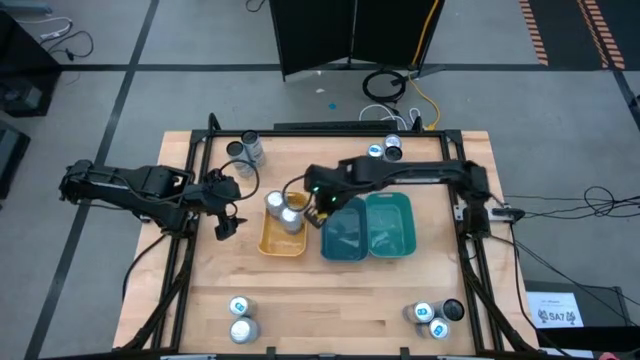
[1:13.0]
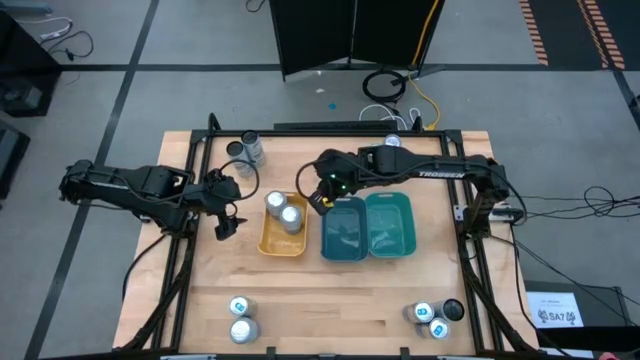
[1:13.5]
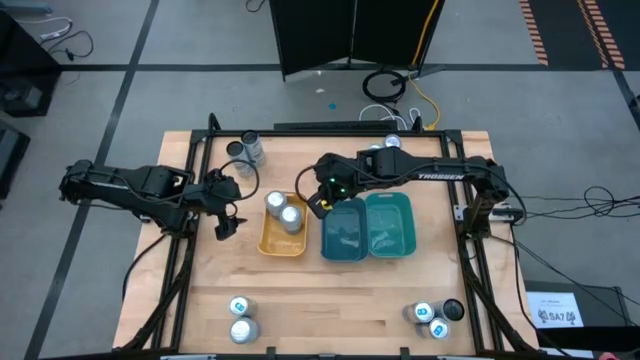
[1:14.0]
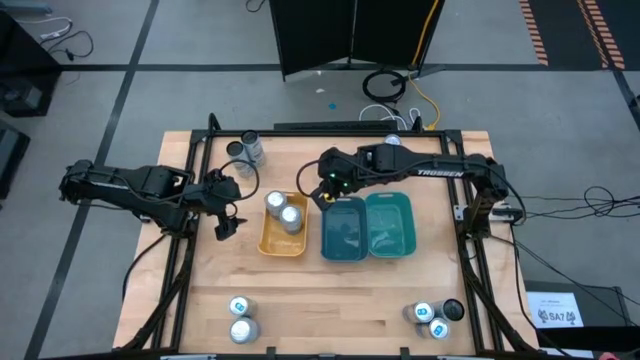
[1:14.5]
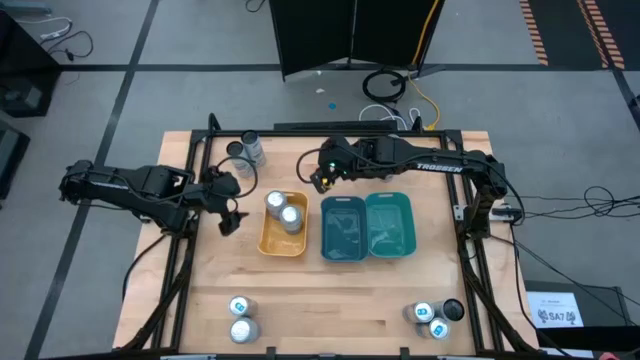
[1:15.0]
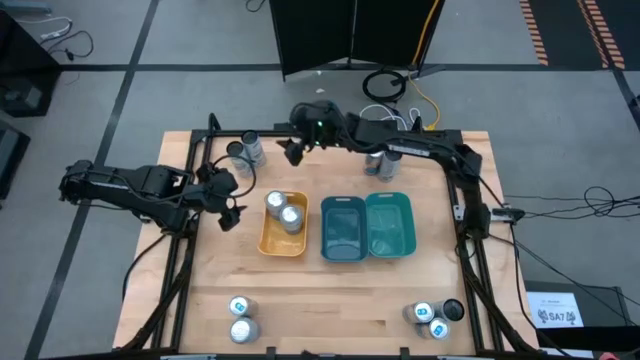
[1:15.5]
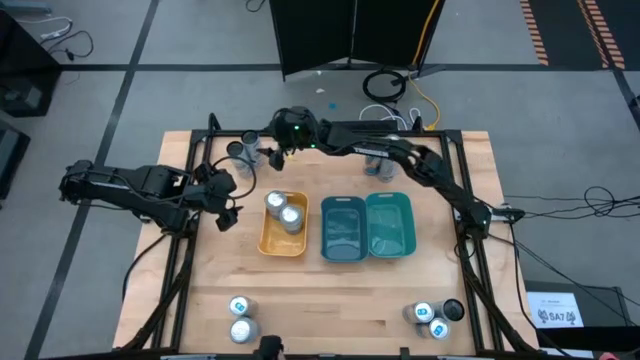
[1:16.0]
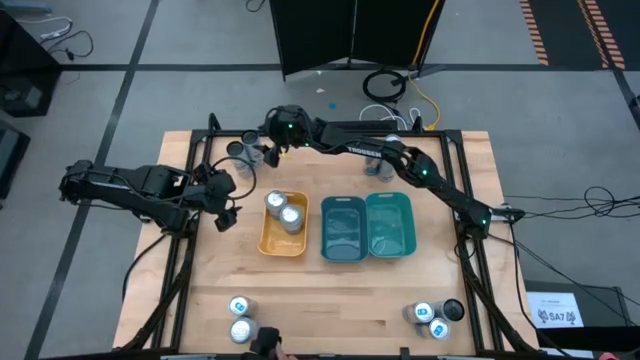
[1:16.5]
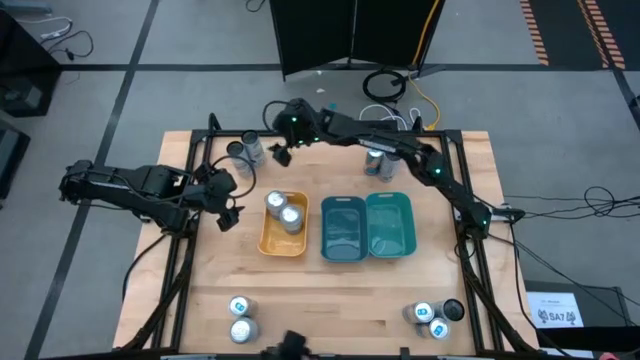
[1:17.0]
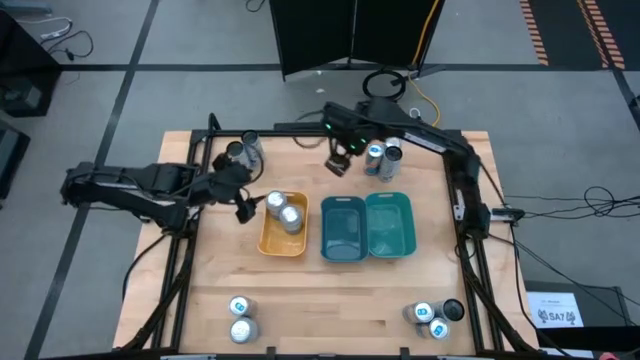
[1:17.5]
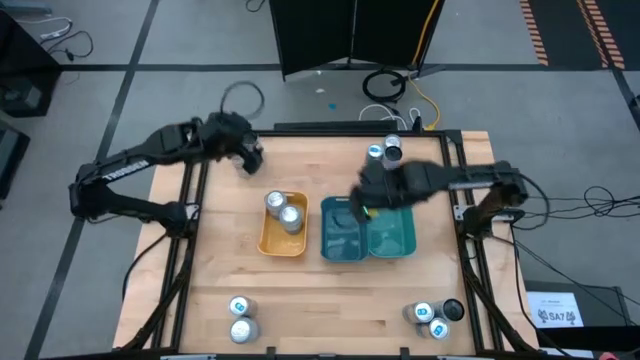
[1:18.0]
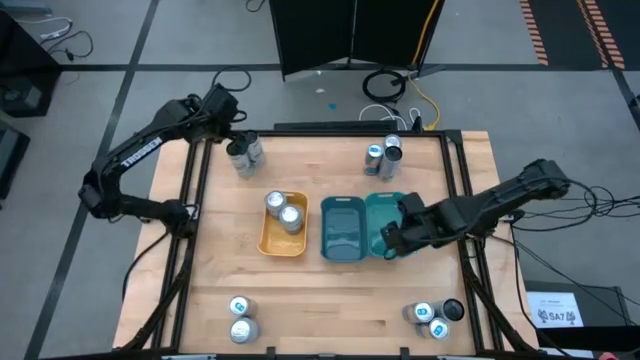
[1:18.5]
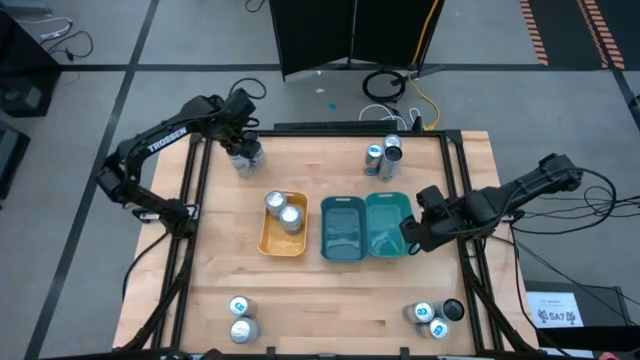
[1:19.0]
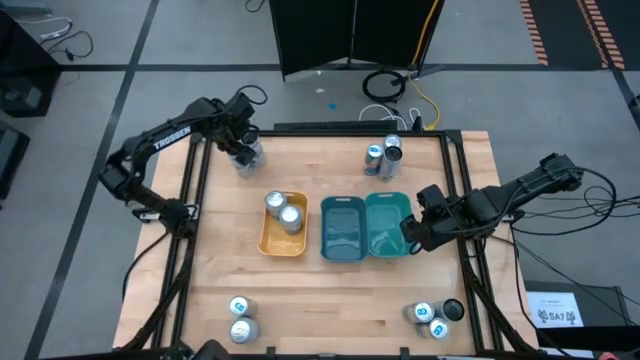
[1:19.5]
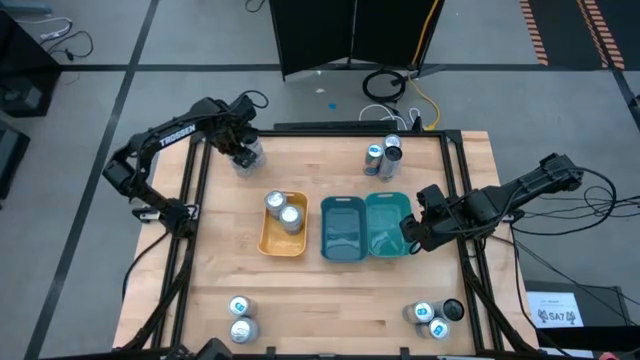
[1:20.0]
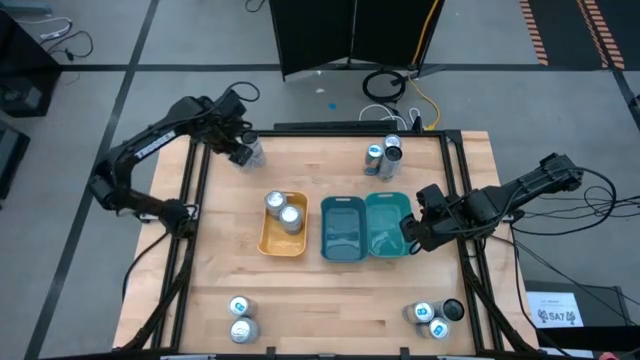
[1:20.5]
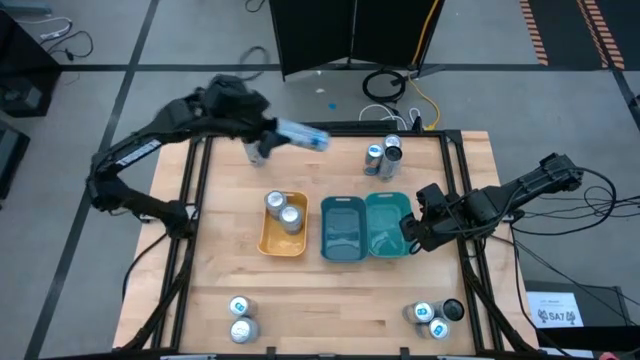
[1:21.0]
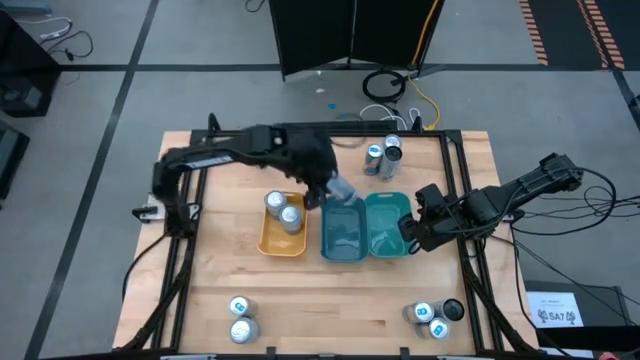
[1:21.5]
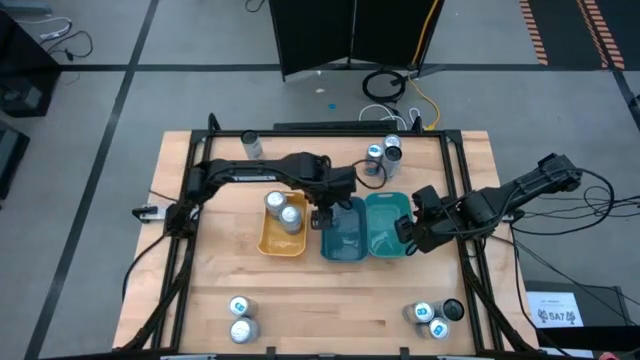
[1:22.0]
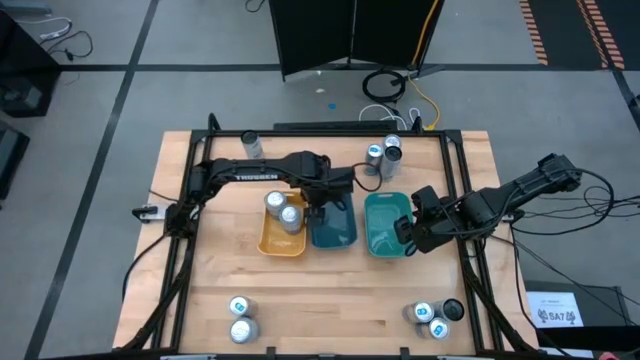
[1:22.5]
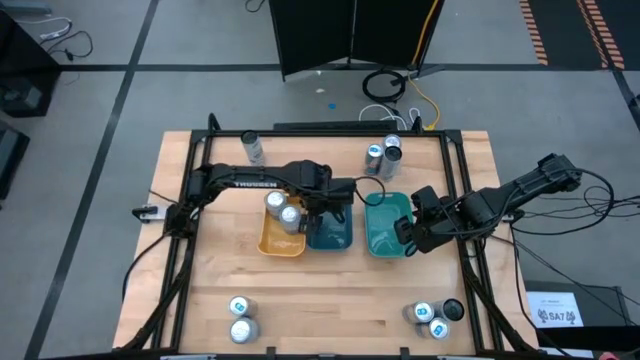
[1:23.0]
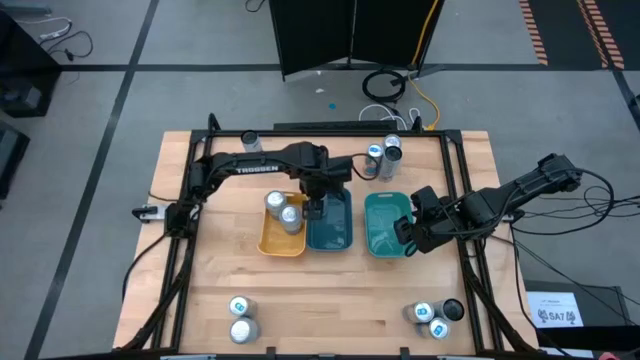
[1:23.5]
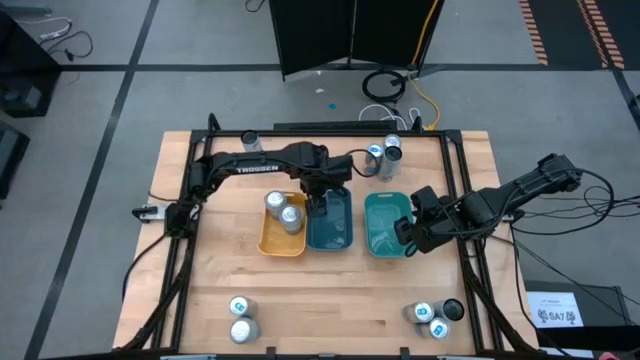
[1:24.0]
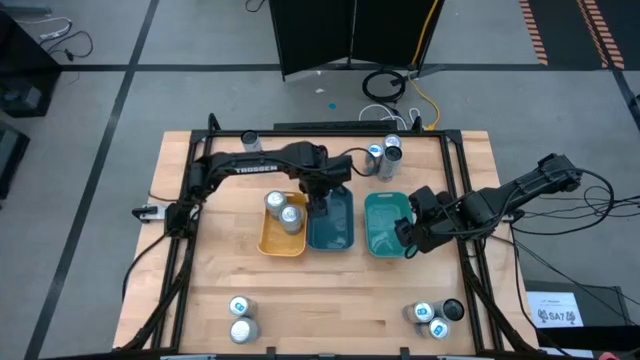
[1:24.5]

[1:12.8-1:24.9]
Task: Sort soda cans
Put the white-blue soda can into the blue bin

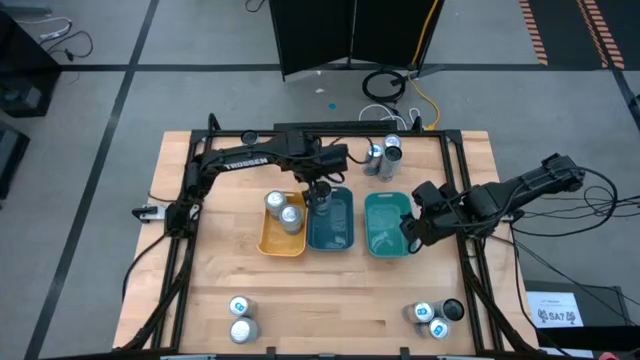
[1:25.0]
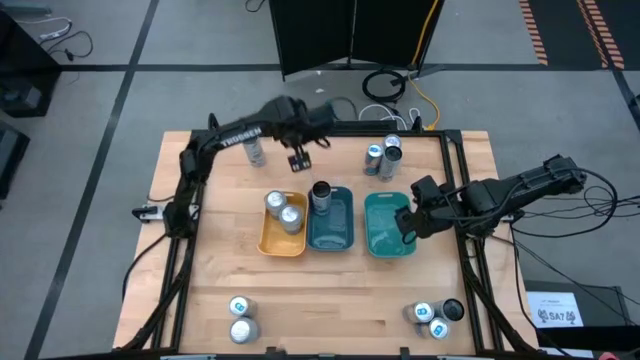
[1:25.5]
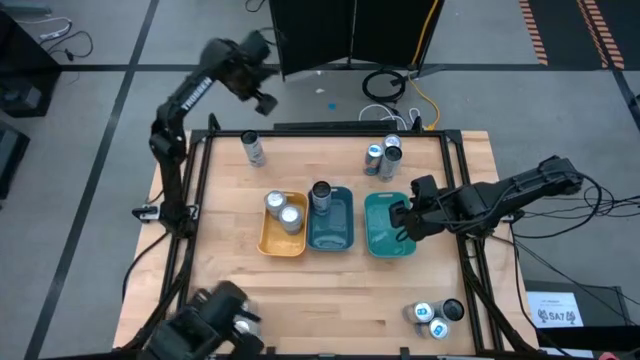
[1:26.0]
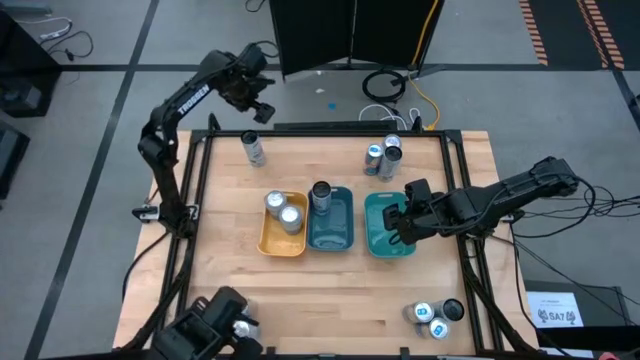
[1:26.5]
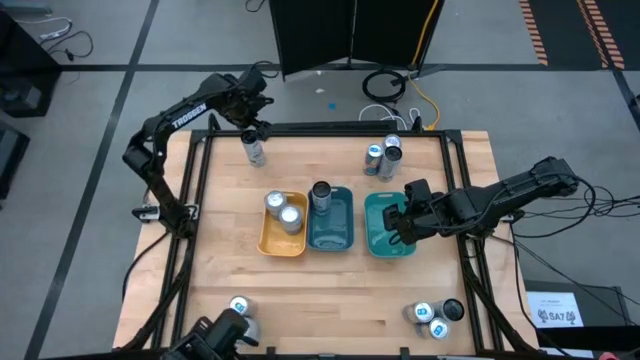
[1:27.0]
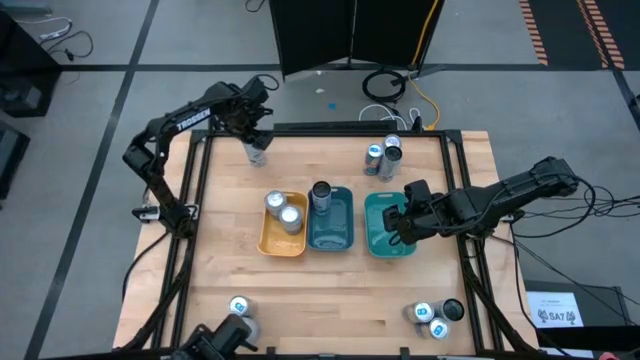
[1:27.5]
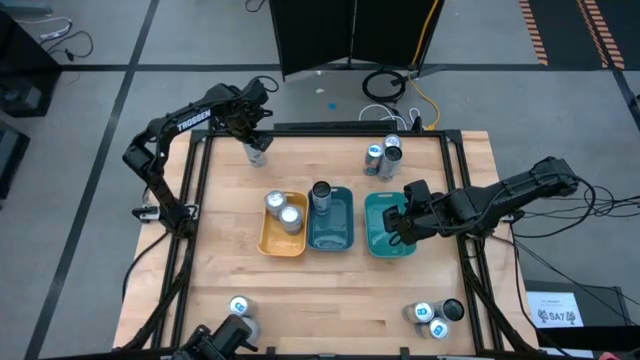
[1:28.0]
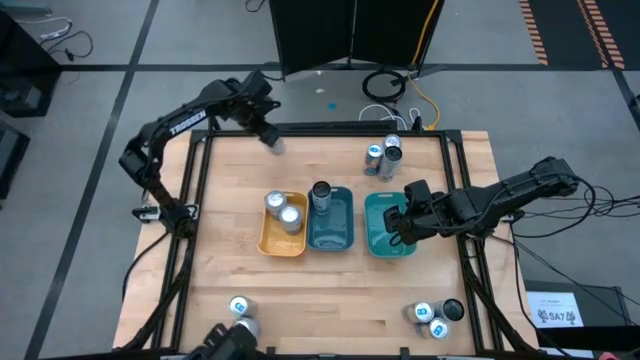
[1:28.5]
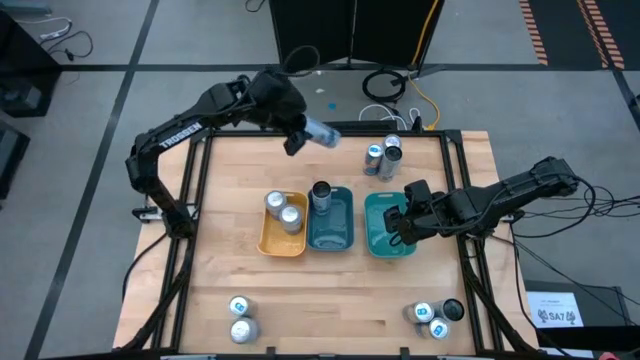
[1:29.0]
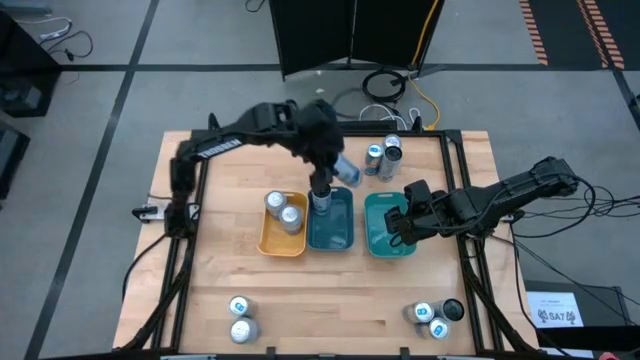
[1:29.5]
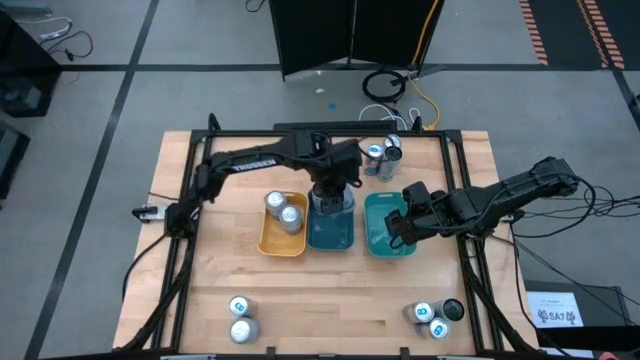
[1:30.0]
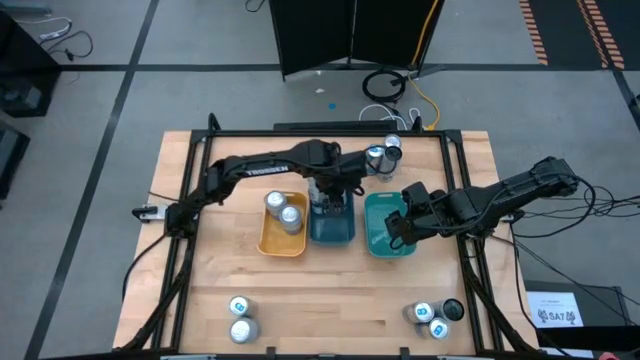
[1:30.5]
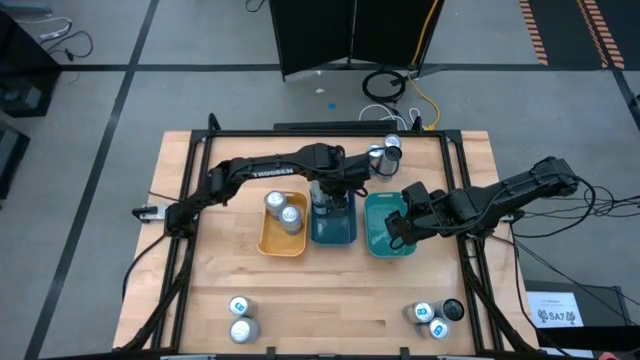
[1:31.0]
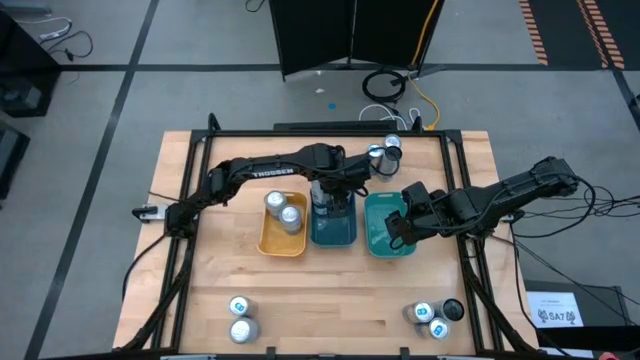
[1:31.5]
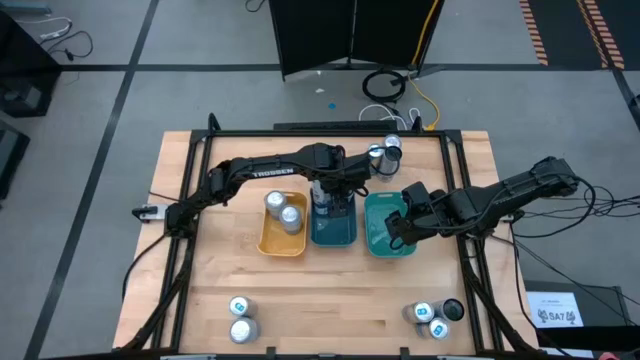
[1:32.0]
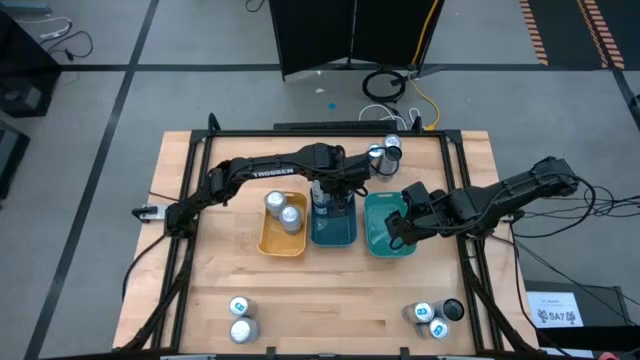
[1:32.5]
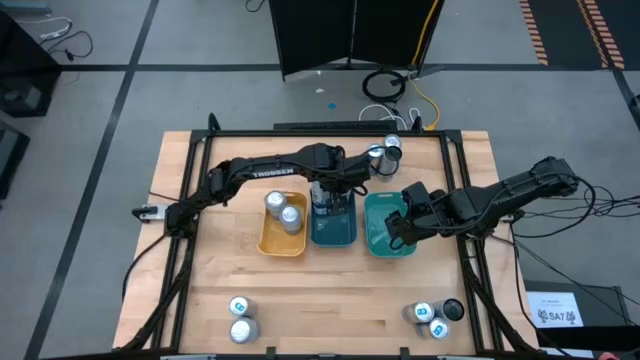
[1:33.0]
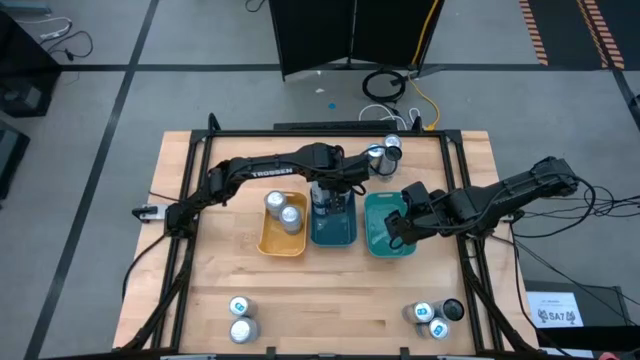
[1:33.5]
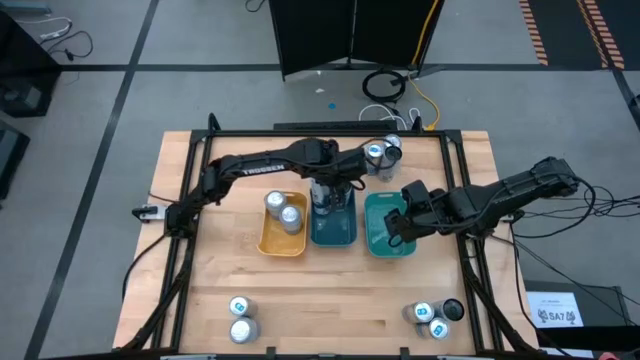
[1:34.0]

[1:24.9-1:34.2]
Put the white-blue soda can into the blue bin
